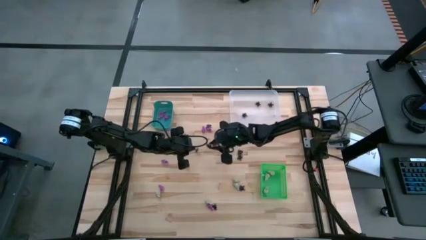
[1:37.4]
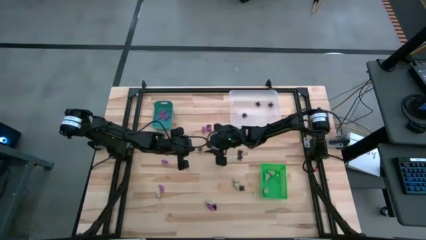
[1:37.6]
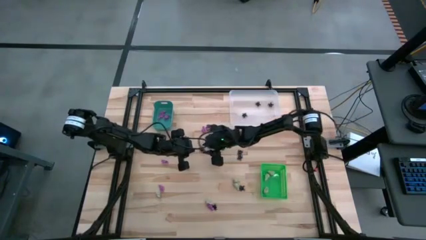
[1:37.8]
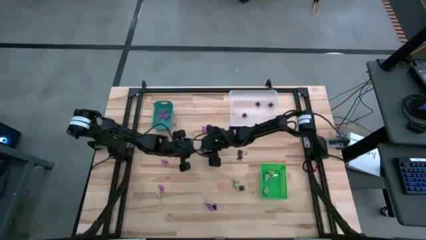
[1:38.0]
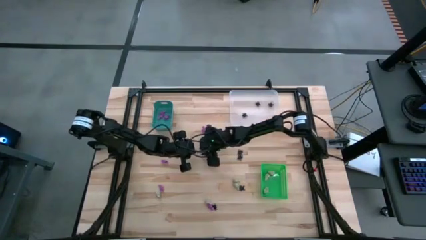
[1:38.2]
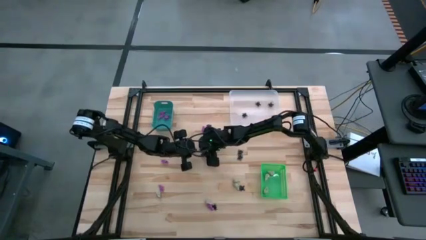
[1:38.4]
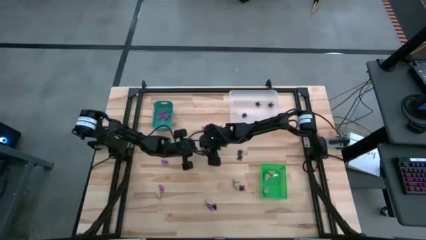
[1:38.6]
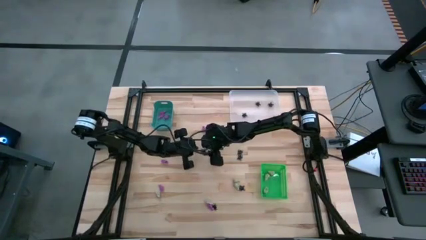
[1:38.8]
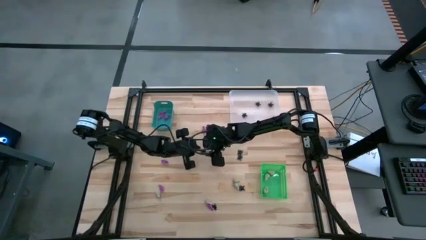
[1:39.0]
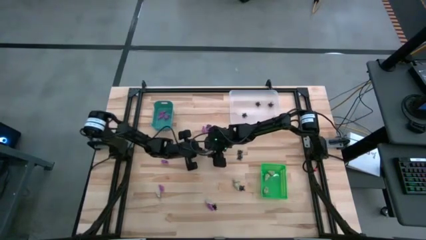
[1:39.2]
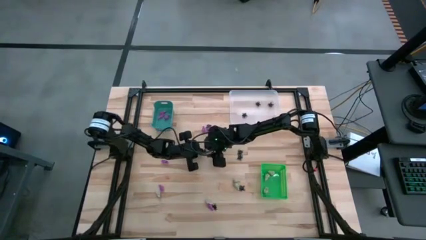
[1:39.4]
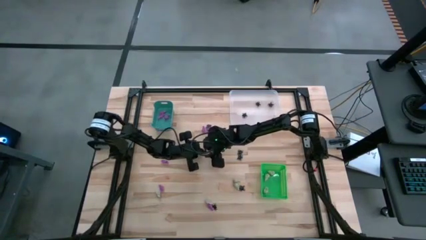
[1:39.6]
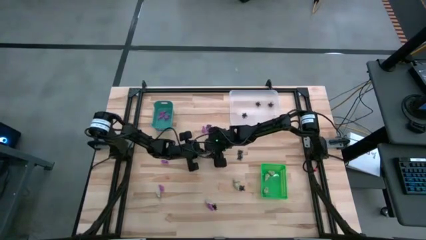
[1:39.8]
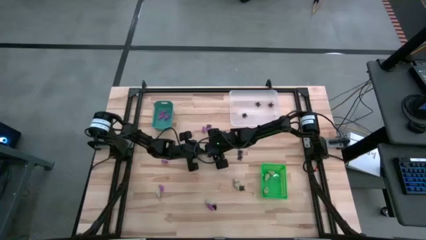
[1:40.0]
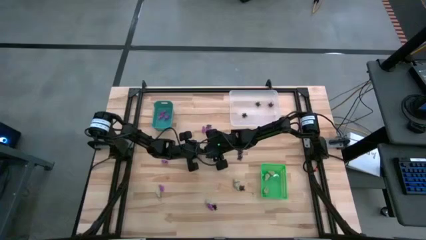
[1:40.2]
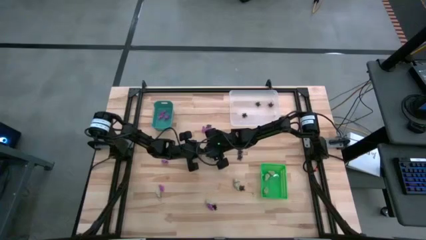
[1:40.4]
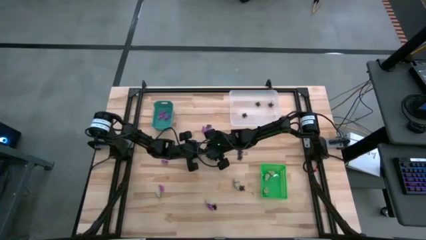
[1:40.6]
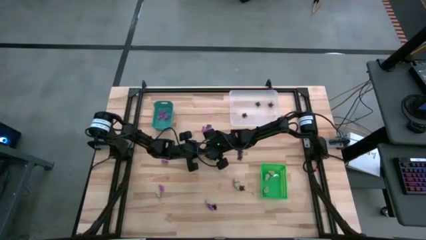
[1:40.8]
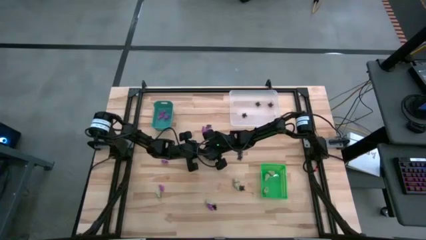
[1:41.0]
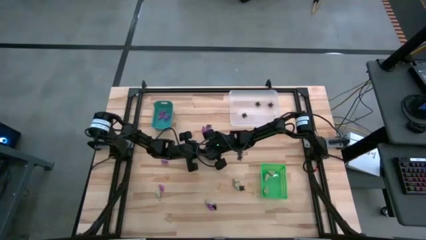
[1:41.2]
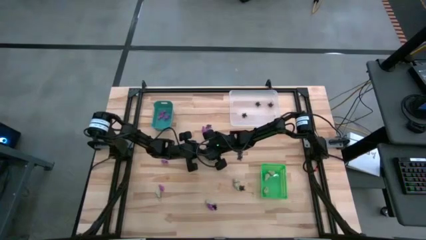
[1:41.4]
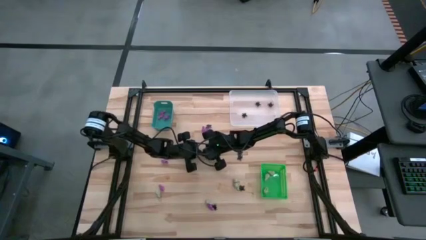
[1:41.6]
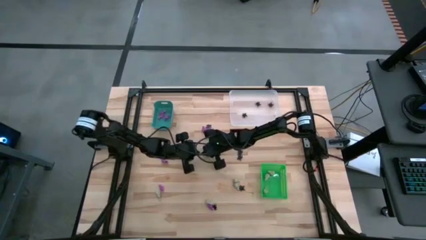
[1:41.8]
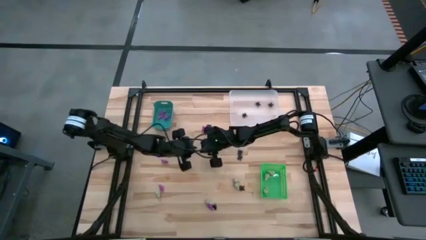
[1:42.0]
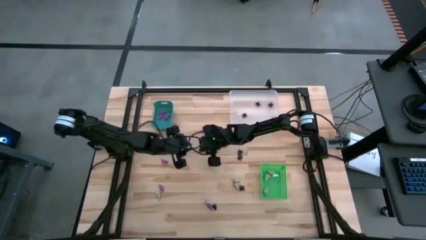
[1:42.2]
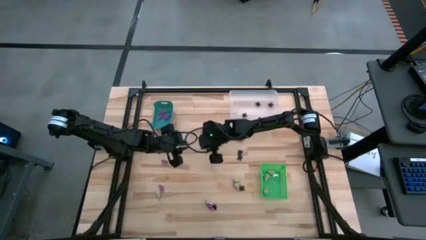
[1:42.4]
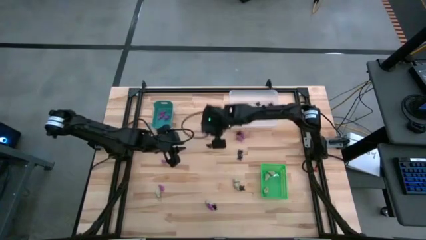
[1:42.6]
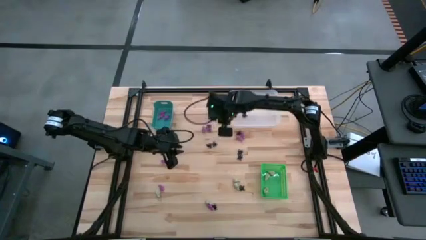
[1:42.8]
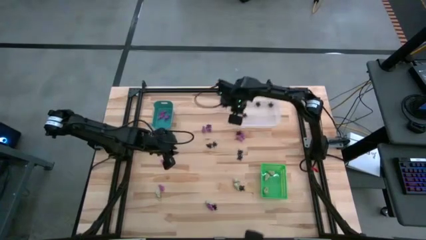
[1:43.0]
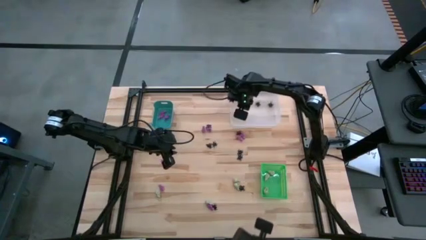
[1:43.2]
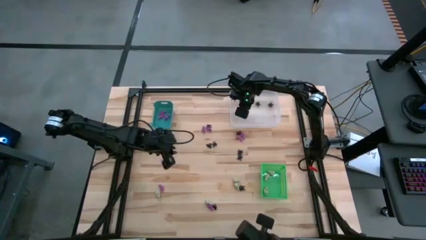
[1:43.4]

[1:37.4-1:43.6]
Task: Sort Halloween decoration
Put the black spider toy into the white bin

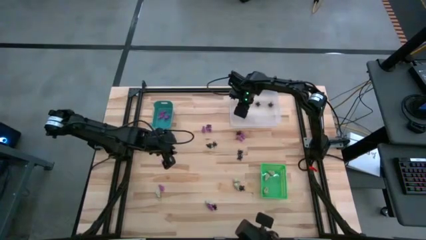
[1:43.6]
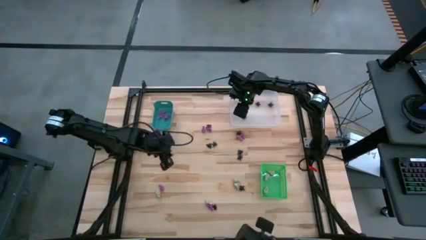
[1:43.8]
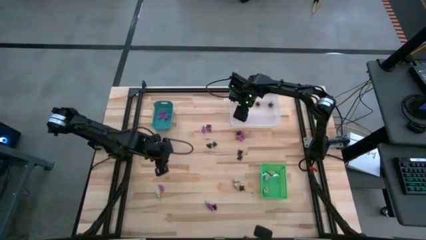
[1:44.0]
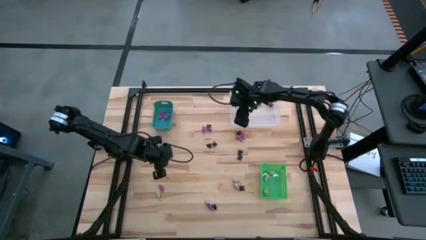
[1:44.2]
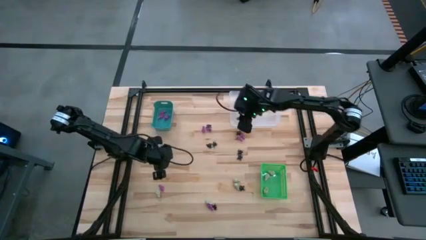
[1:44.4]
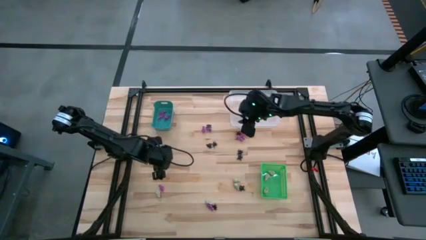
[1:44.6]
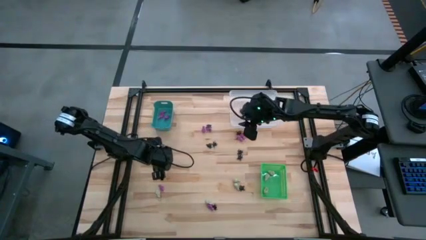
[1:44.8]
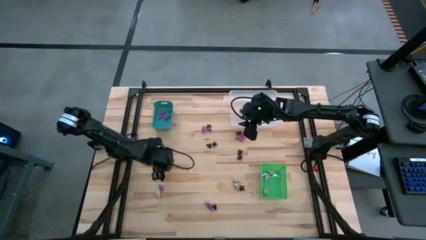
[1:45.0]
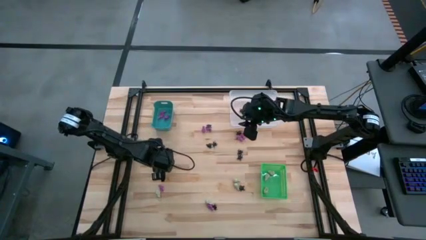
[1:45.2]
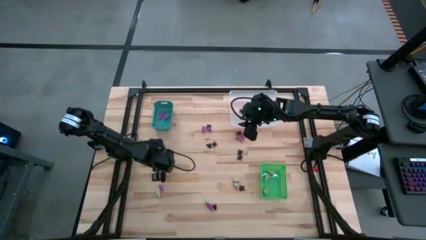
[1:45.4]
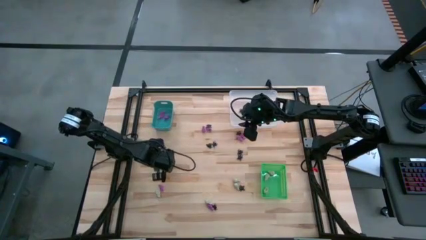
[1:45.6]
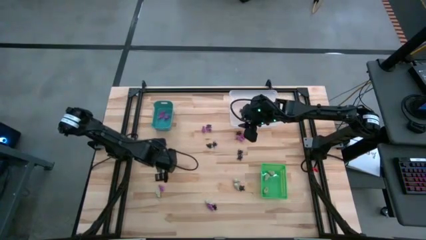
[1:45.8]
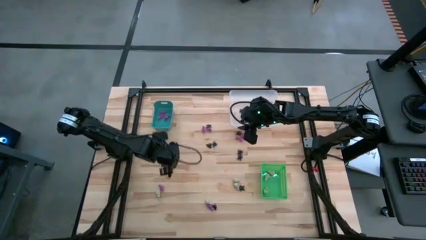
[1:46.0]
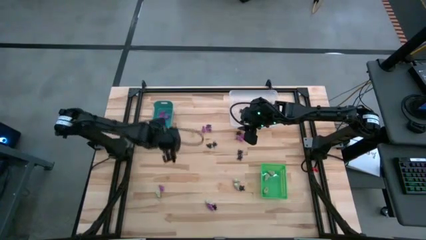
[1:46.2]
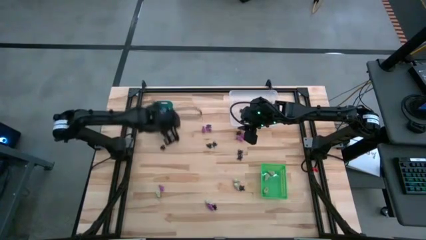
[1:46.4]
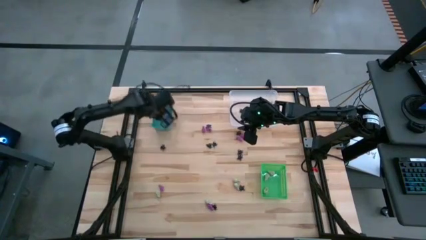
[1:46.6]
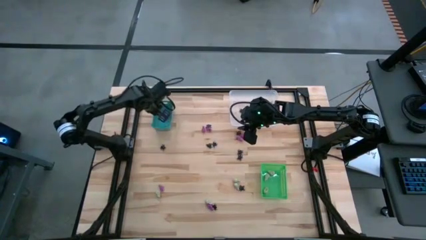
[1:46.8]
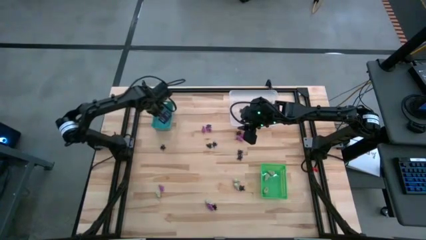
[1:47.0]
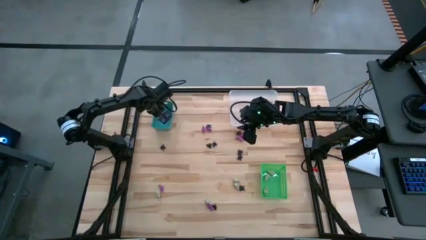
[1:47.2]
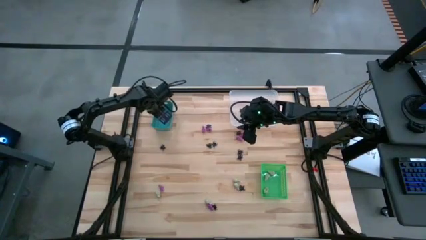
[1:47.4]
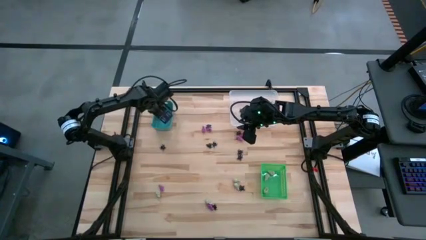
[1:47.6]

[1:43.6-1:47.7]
Put the purple skeleton toy into the blue bin

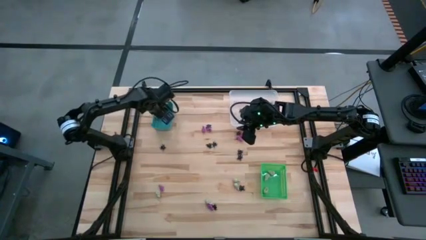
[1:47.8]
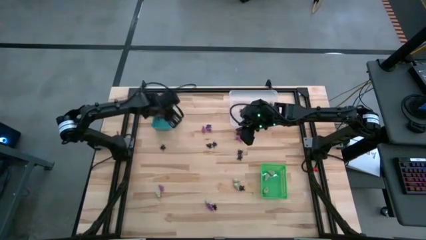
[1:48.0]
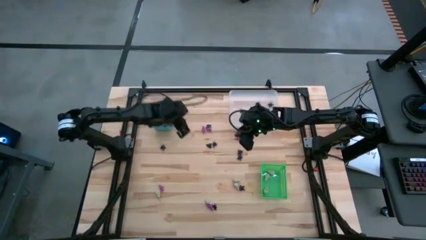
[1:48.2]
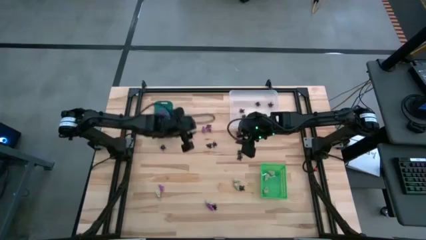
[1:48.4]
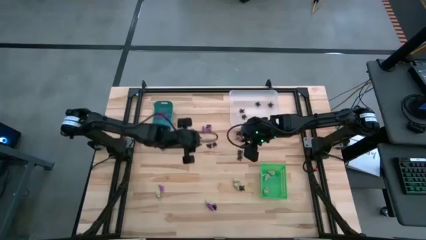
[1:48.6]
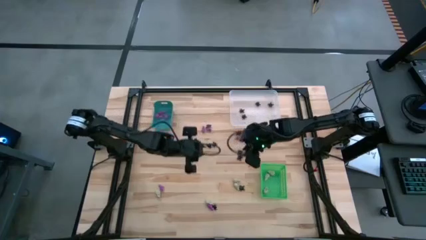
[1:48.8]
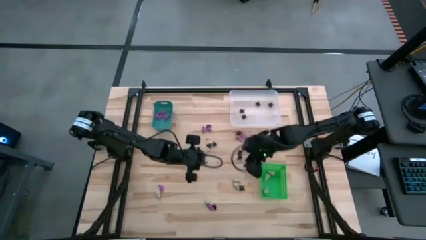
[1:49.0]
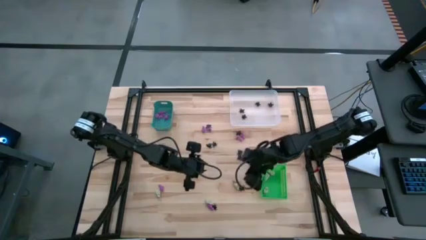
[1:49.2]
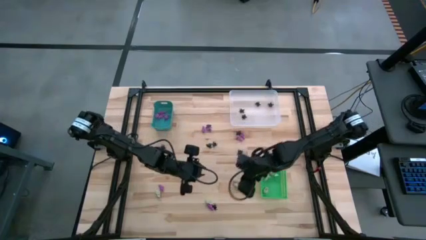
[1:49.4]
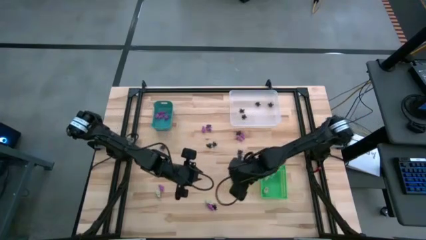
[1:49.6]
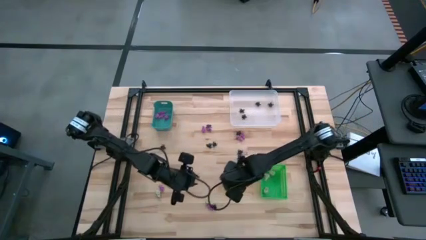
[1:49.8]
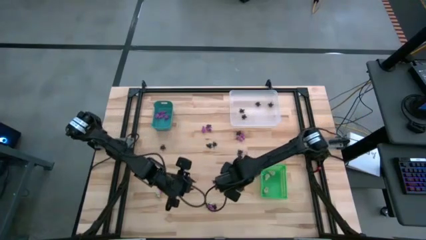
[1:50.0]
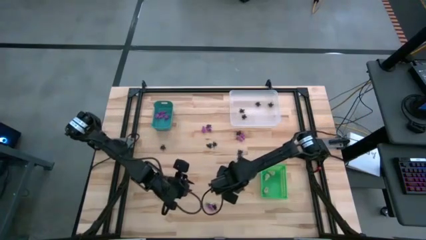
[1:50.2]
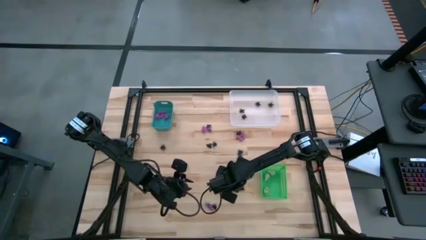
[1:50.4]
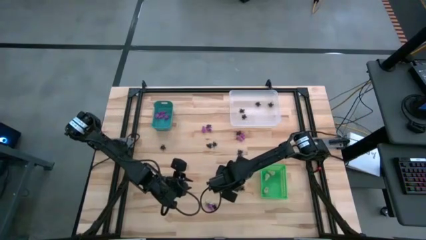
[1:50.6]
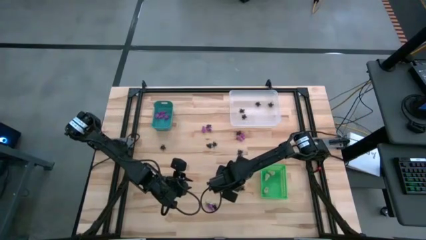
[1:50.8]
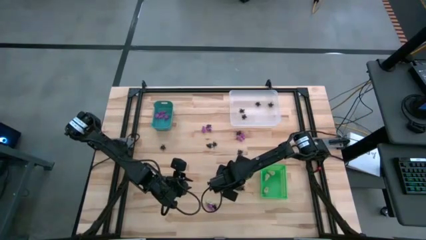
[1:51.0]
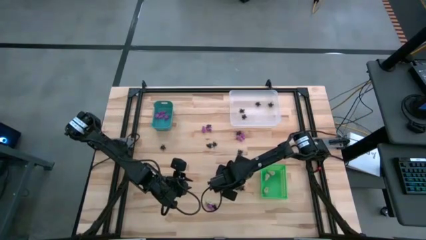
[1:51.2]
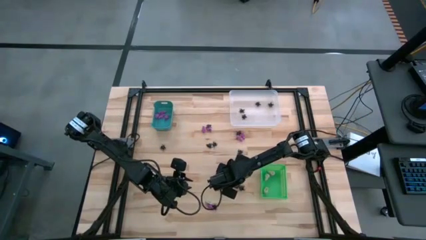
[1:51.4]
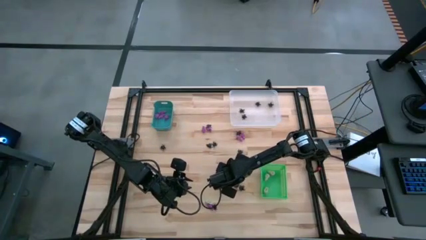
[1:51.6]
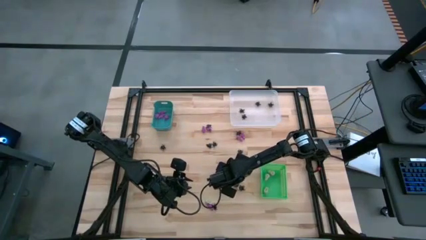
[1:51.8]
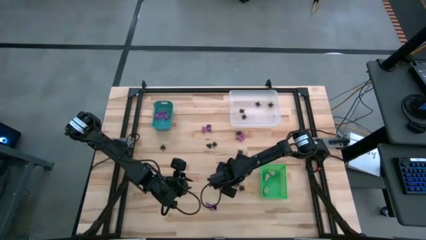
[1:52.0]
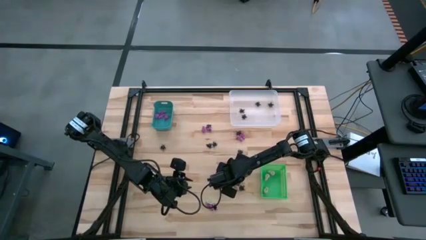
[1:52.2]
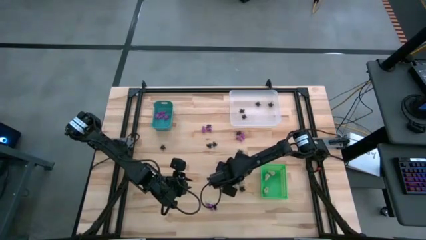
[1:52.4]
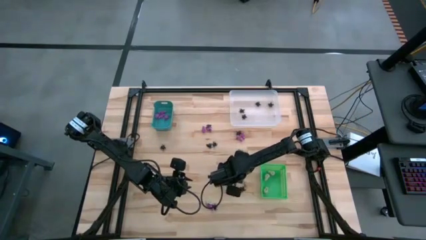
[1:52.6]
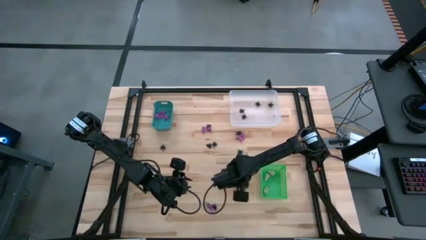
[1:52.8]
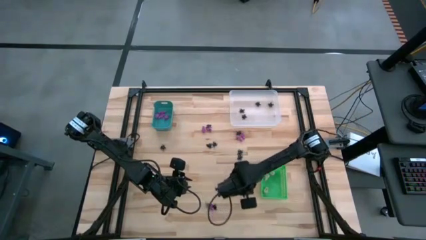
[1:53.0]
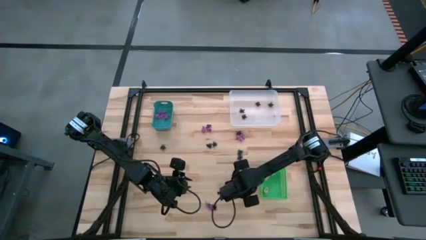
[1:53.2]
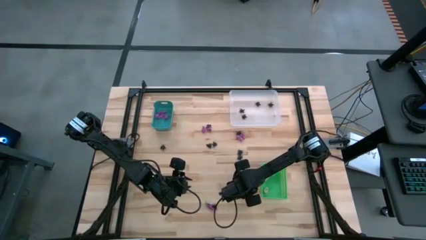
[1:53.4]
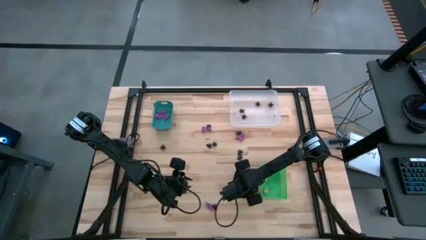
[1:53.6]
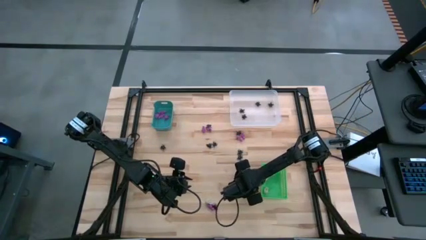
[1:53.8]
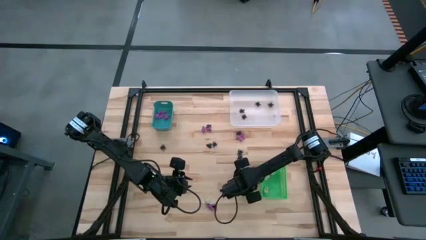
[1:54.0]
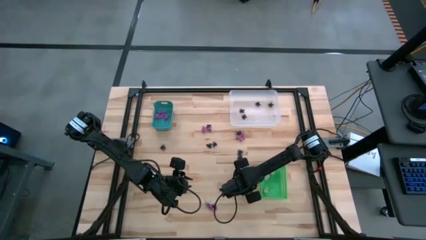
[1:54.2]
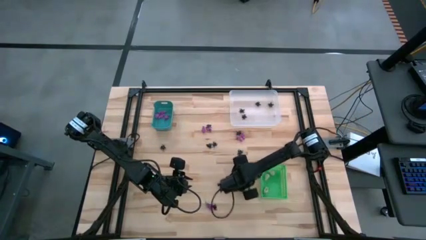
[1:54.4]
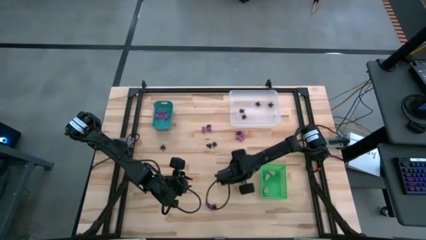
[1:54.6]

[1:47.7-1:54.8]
Put the white skull toy into the green bin
